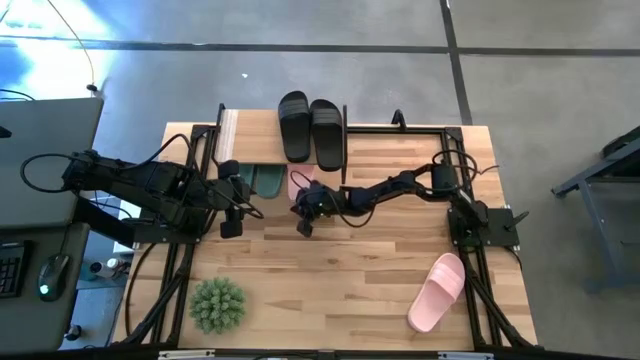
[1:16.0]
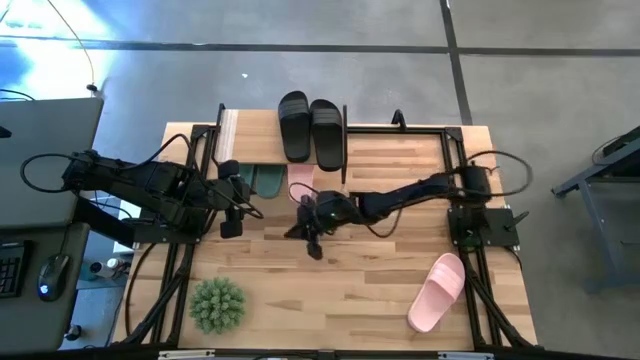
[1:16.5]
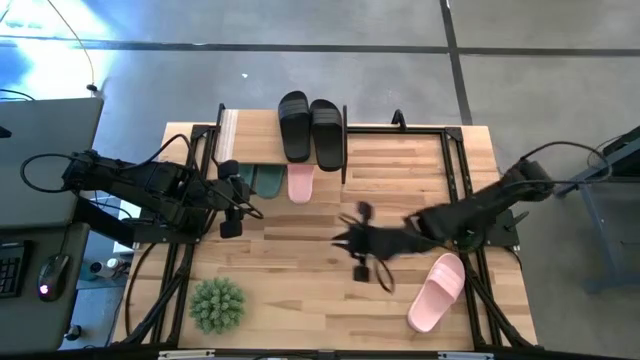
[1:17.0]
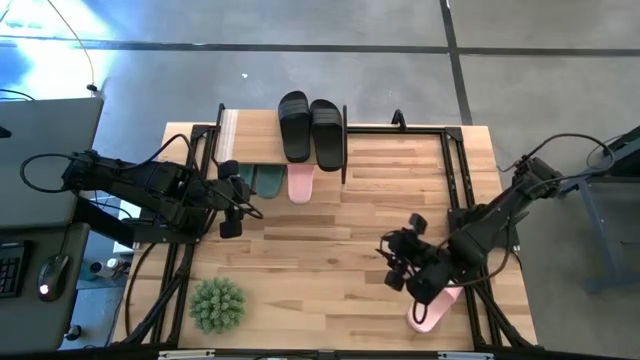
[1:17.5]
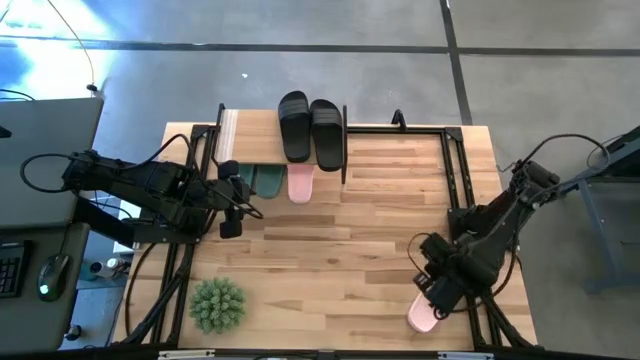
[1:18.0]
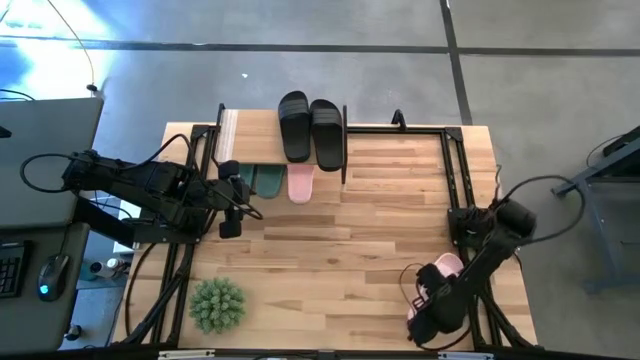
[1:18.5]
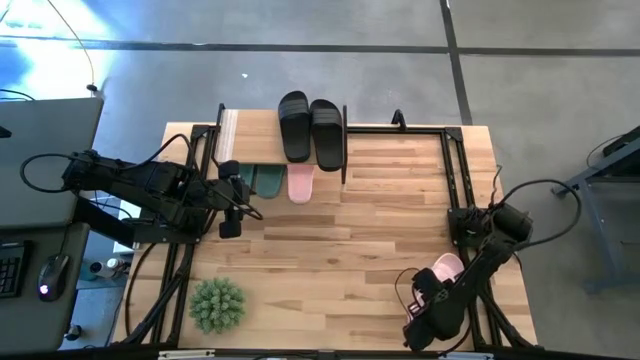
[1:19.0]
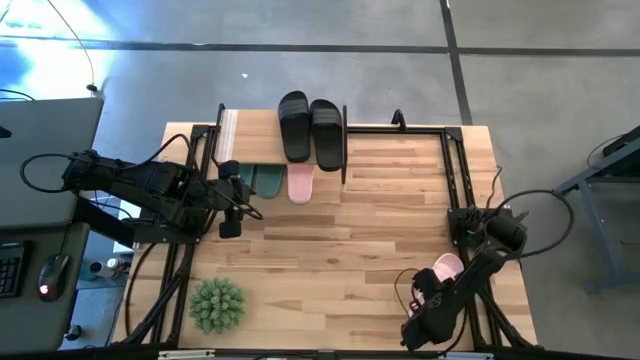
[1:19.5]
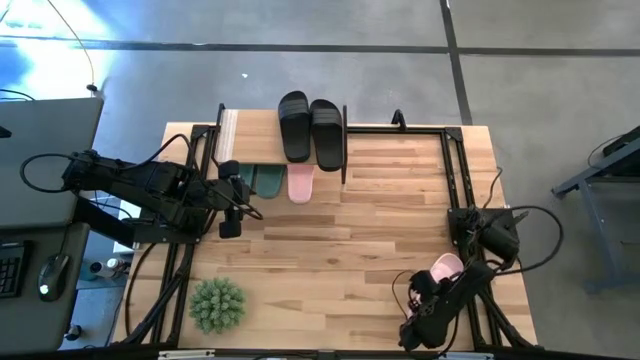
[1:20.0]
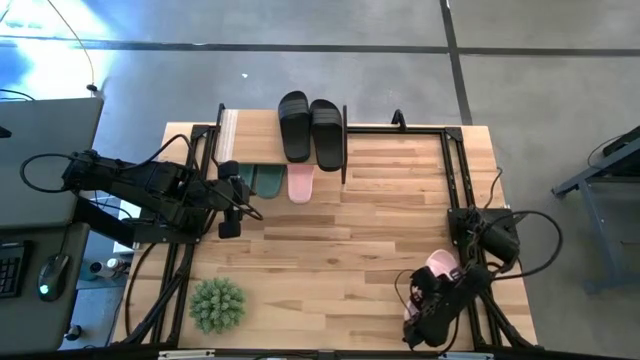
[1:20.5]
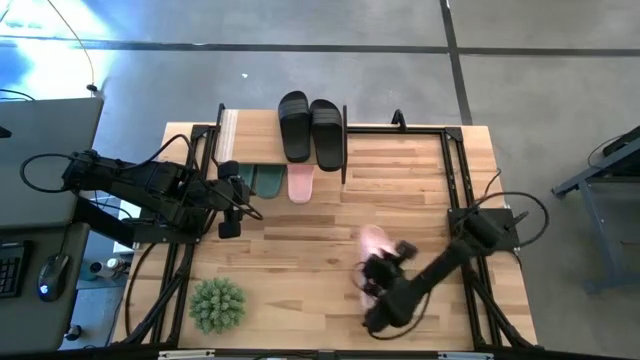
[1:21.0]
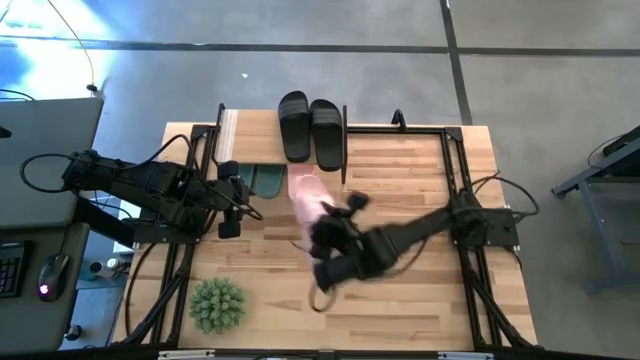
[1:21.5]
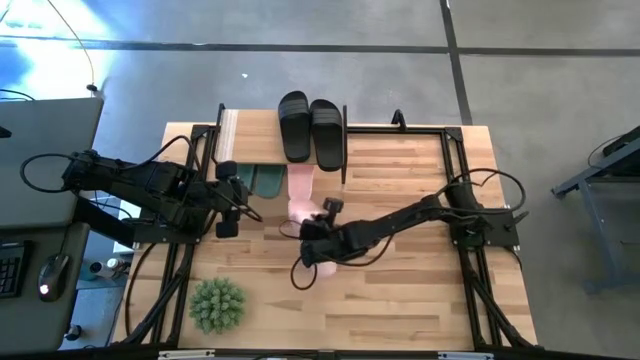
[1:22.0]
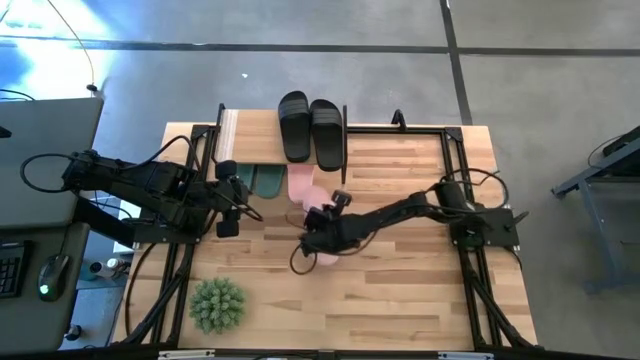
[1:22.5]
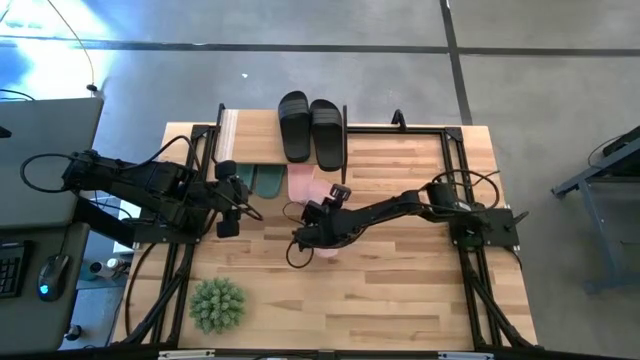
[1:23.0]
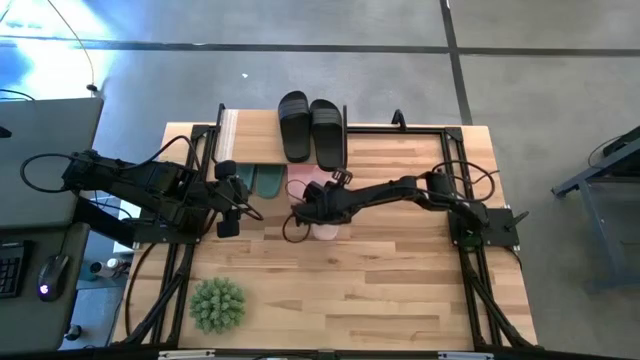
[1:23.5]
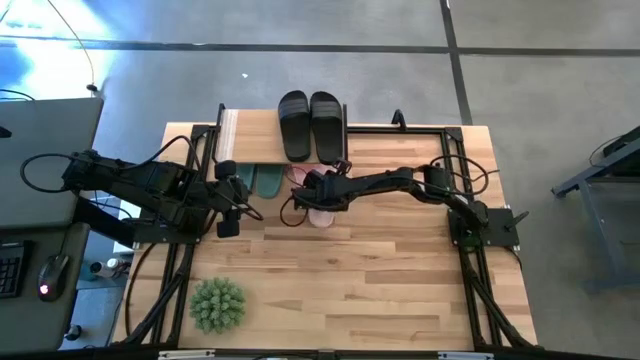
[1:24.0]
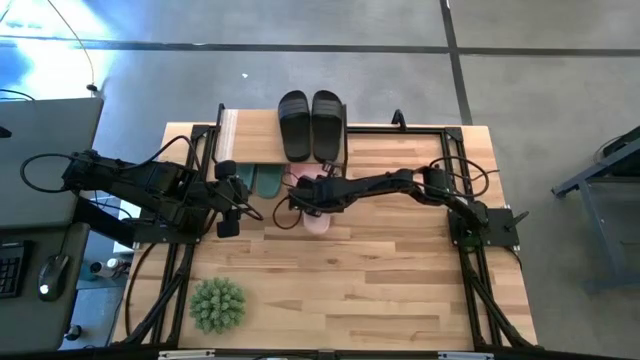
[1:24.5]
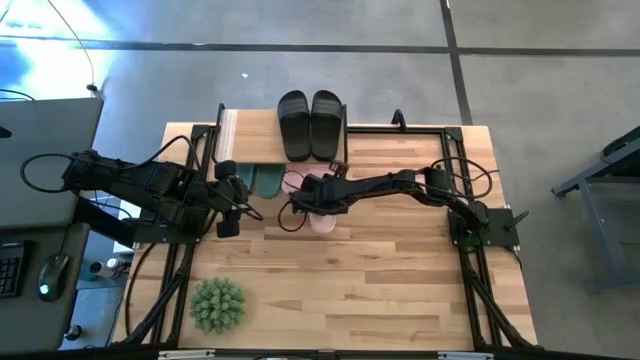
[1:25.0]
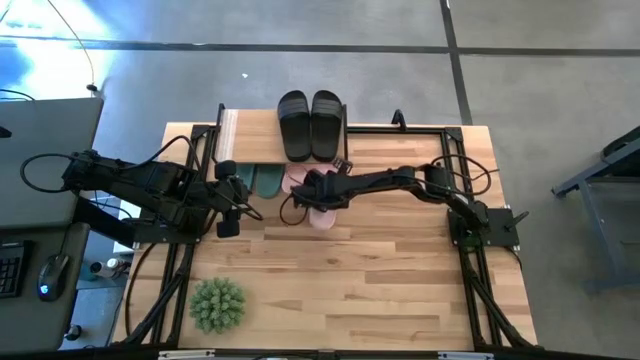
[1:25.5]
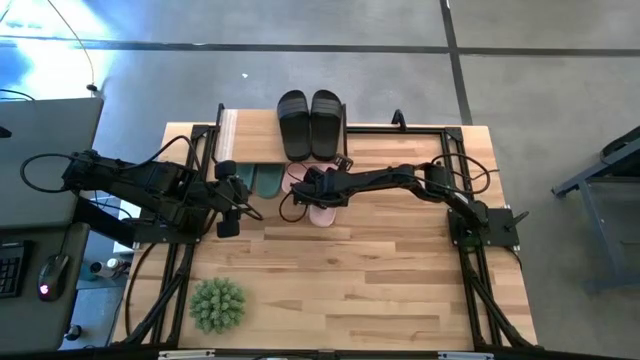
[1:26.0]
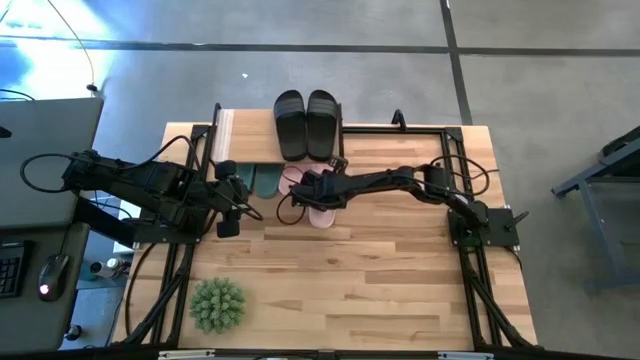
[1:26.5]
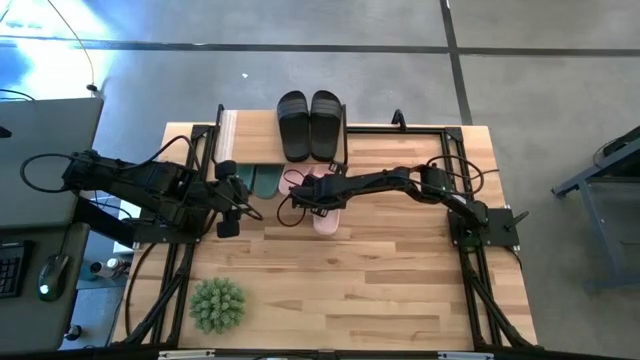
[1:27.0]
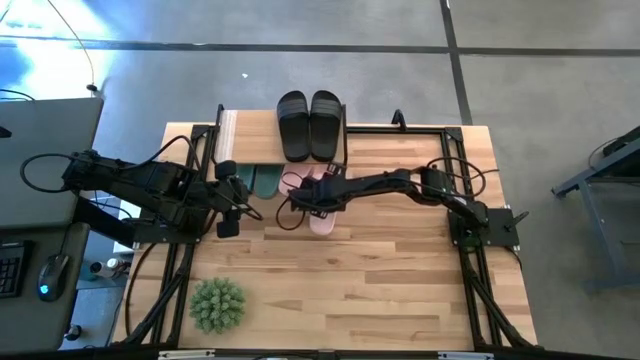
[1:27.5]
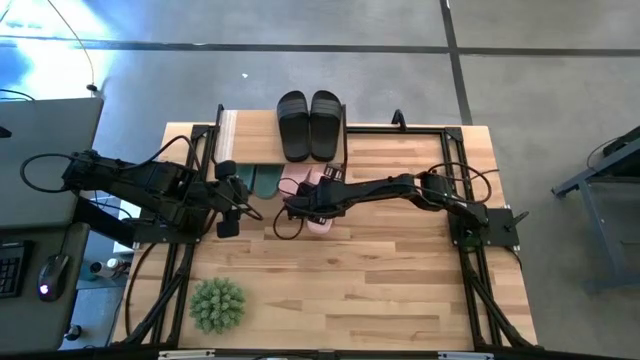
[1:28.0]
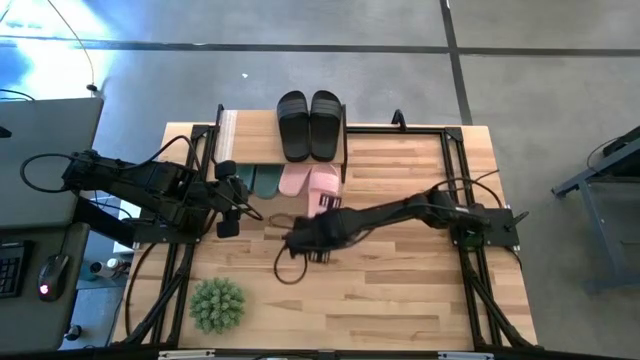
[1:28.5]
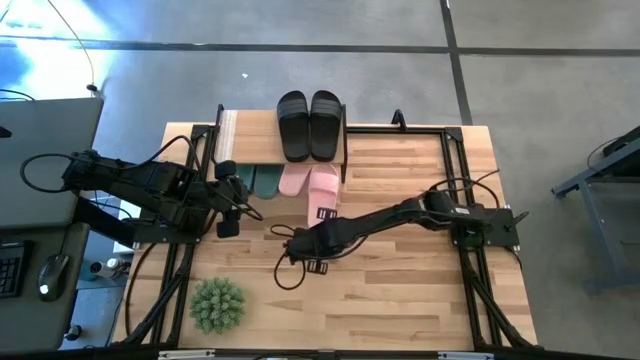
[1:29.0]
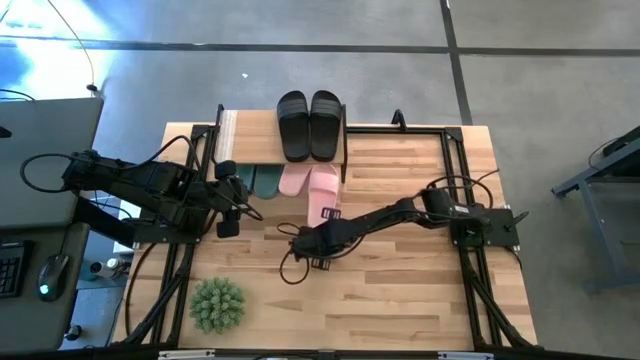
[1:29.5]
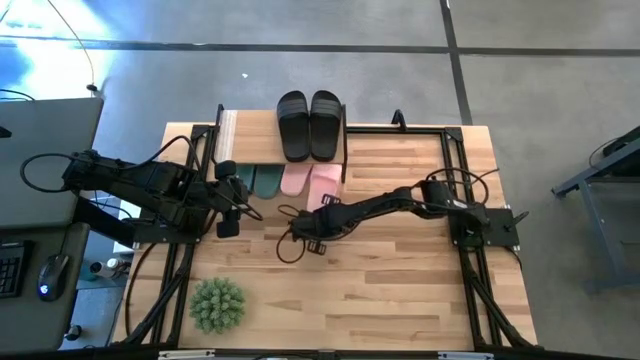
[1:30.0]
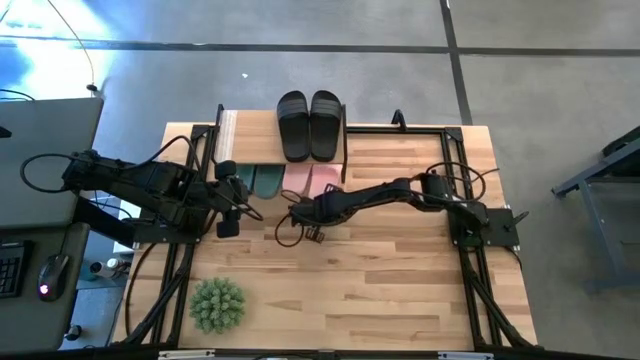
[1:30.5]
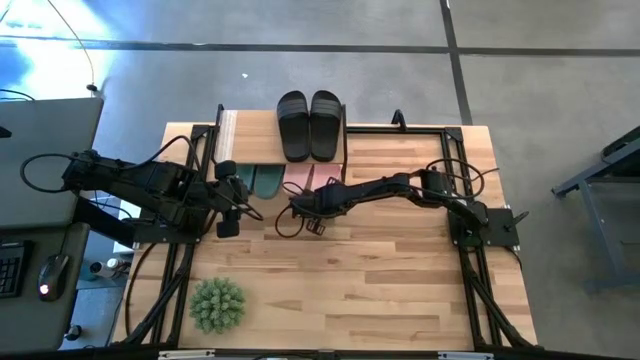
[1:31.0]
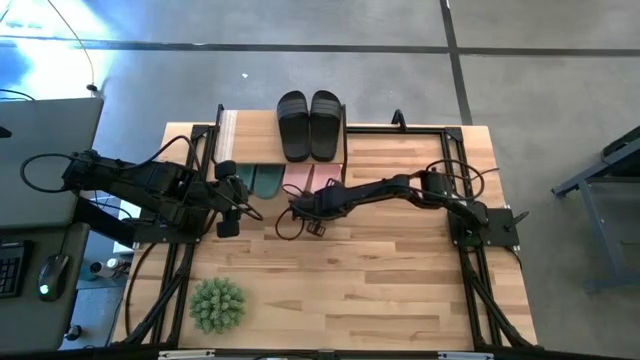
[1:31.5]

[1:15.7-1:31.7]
Task: Pick and place slides into the shelf
Put the pink slide under the shelf

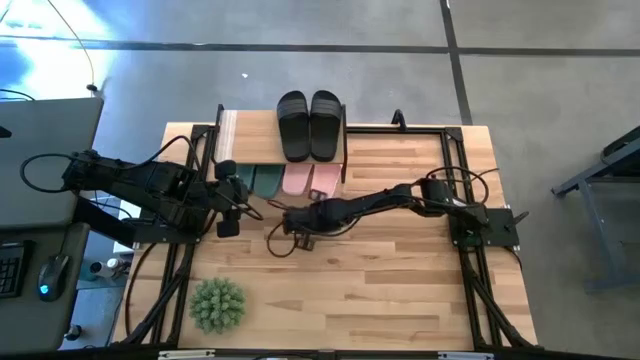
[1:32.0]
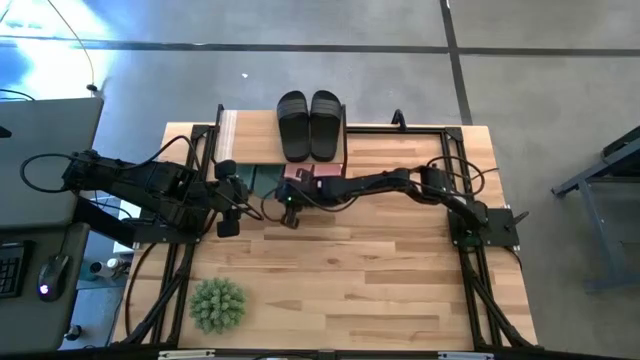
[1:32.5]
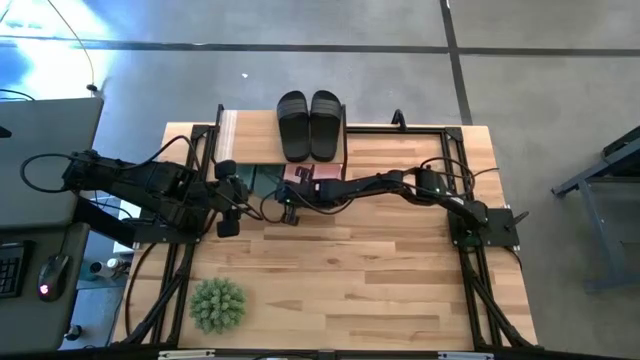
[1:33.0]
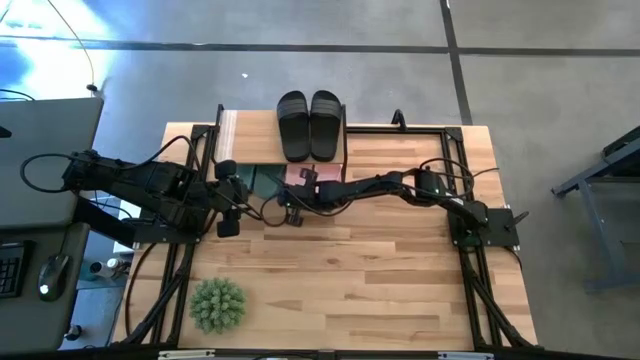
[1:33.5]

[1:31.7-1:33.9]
Adjust the left pink slide under the shelf

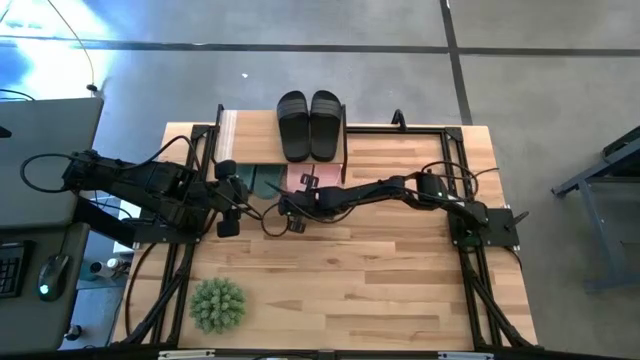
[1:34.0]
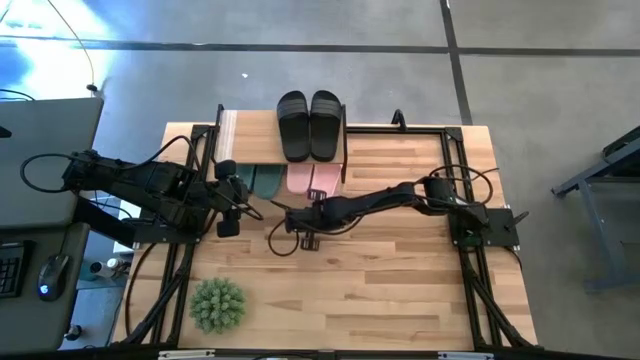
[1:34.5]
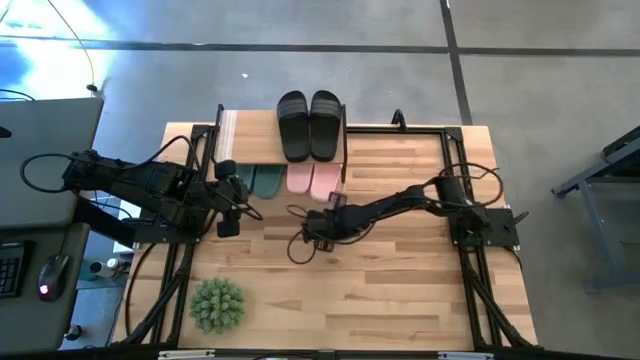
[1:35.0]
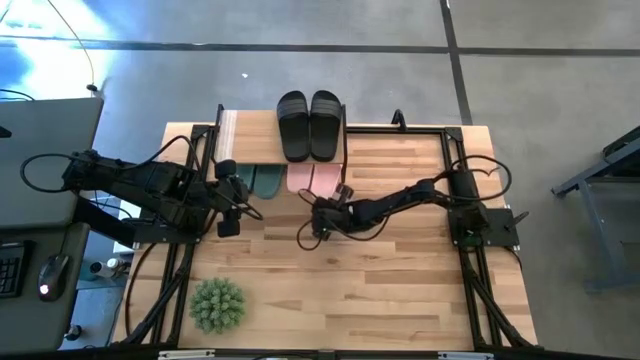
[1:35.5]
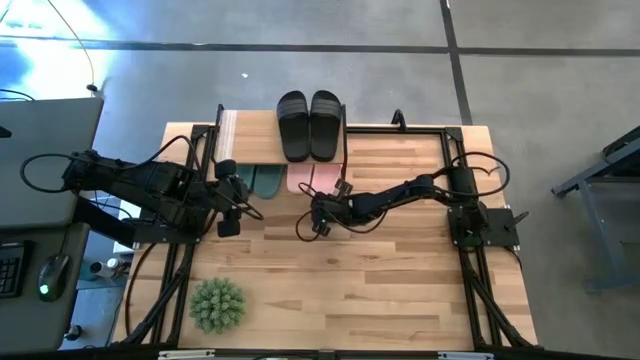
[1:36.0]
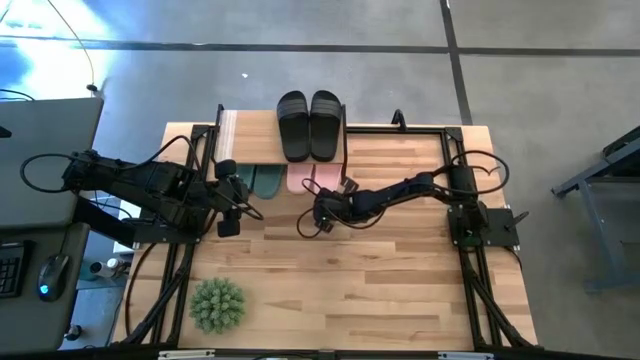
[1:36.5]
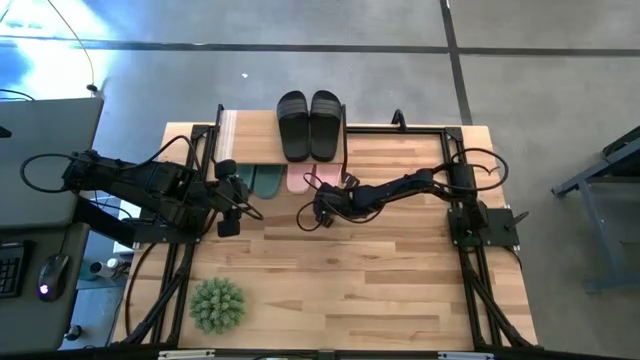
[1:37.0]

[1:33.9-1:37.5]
Adjust the right pink slide under the shelf
